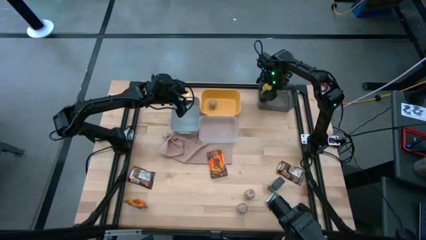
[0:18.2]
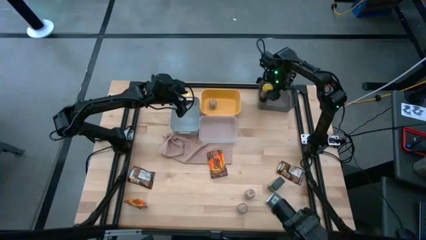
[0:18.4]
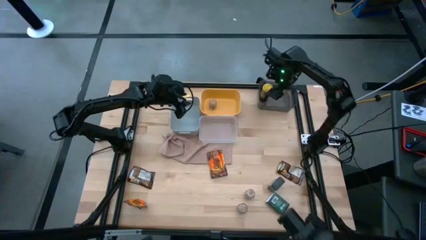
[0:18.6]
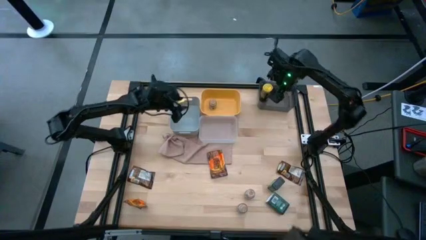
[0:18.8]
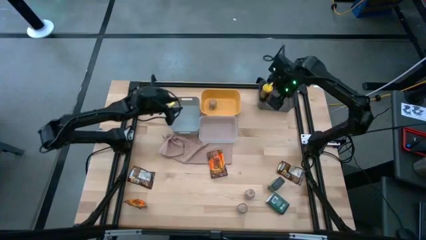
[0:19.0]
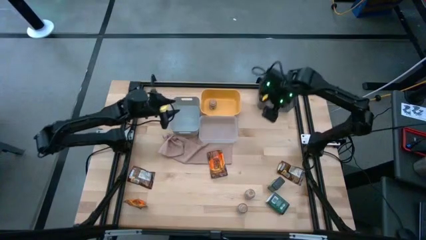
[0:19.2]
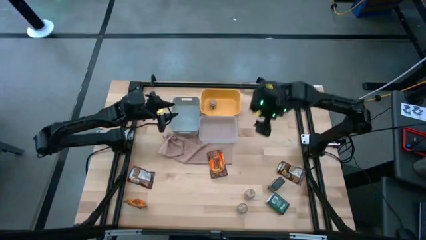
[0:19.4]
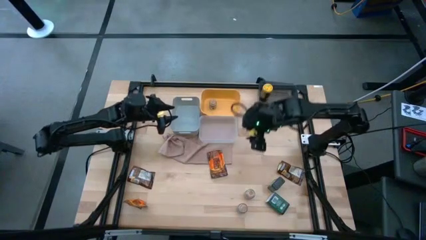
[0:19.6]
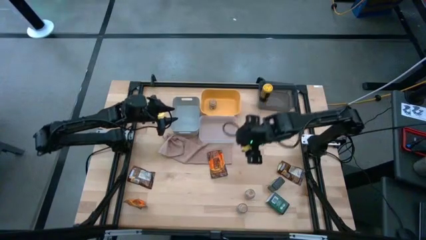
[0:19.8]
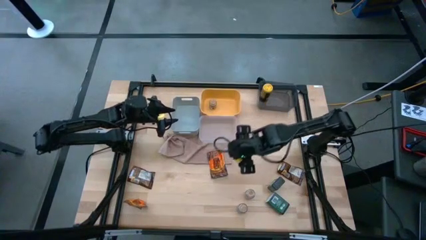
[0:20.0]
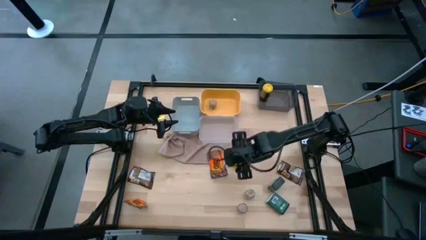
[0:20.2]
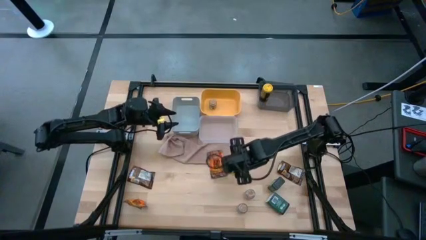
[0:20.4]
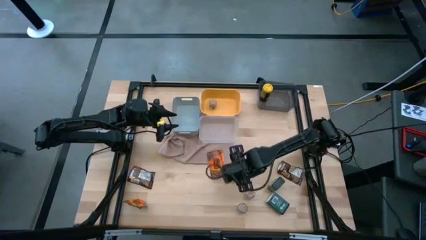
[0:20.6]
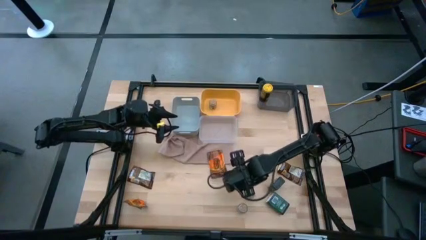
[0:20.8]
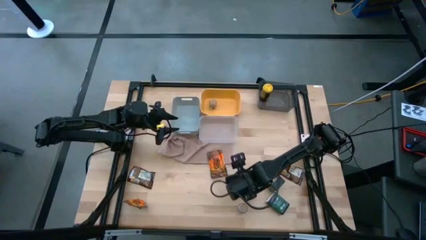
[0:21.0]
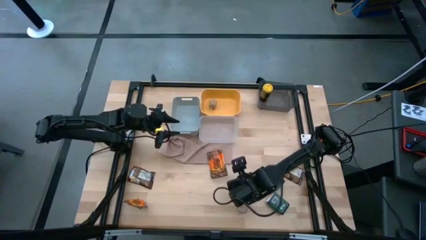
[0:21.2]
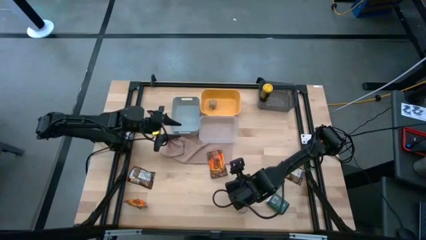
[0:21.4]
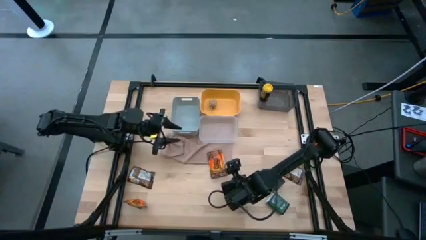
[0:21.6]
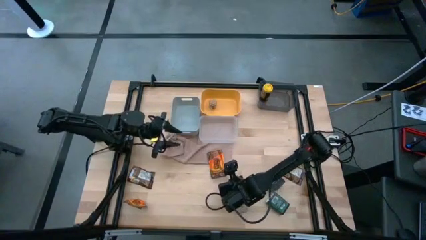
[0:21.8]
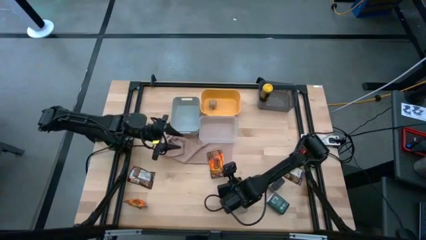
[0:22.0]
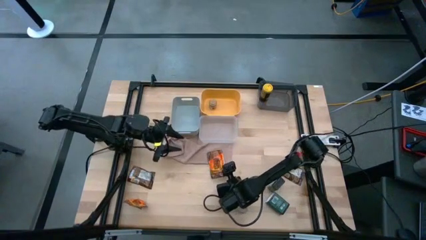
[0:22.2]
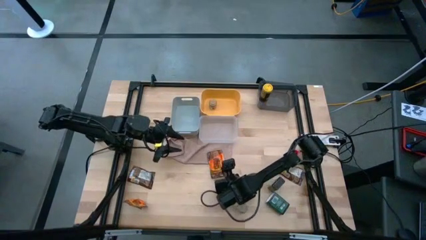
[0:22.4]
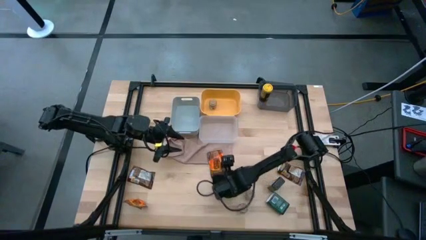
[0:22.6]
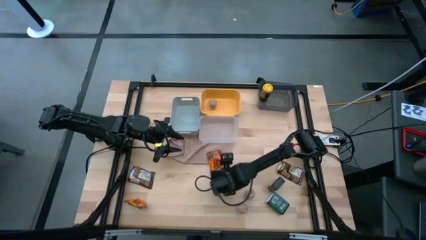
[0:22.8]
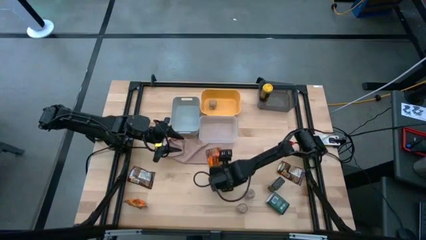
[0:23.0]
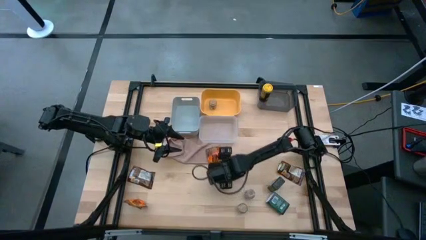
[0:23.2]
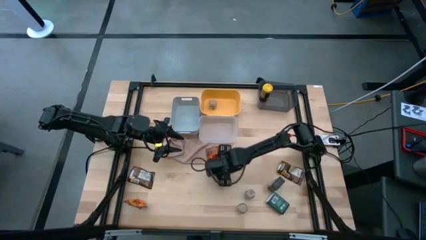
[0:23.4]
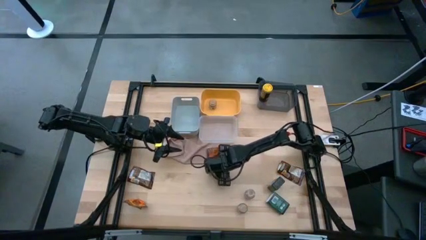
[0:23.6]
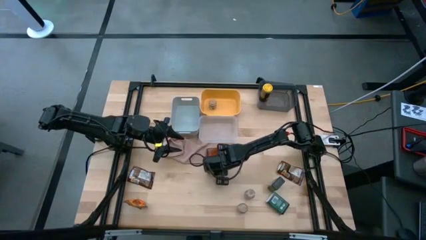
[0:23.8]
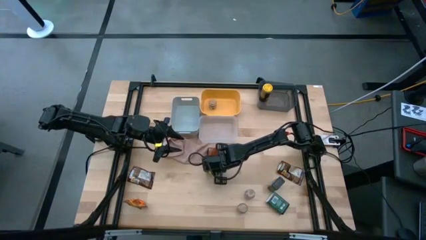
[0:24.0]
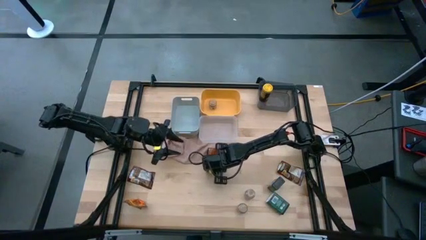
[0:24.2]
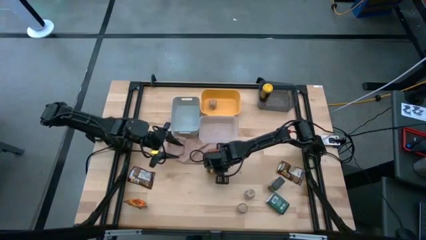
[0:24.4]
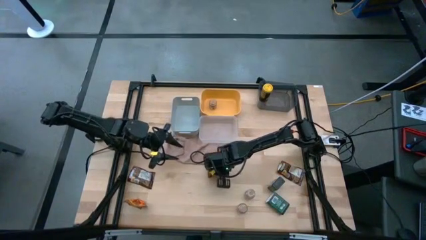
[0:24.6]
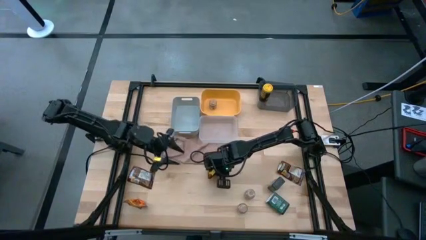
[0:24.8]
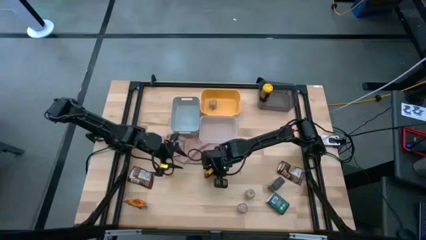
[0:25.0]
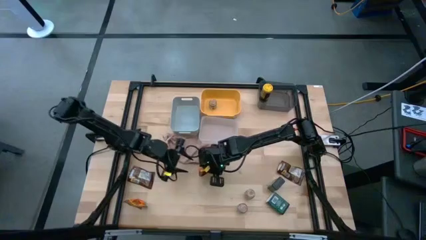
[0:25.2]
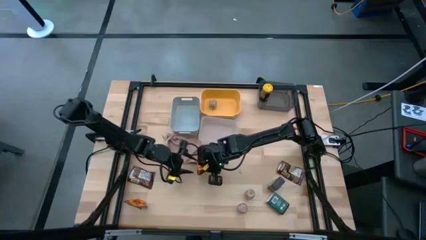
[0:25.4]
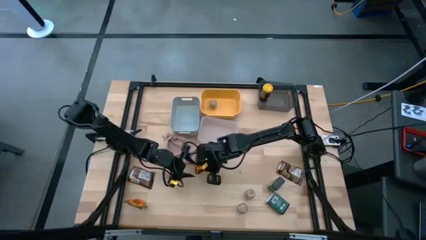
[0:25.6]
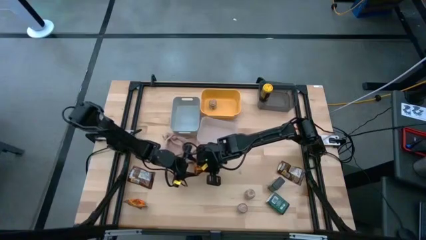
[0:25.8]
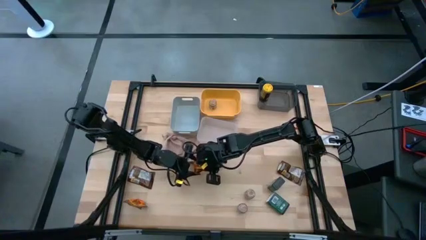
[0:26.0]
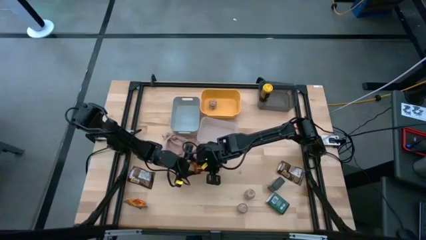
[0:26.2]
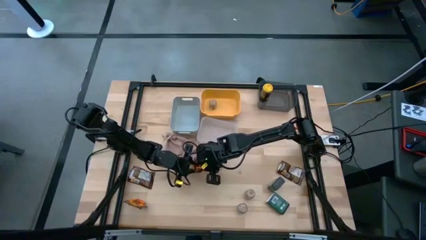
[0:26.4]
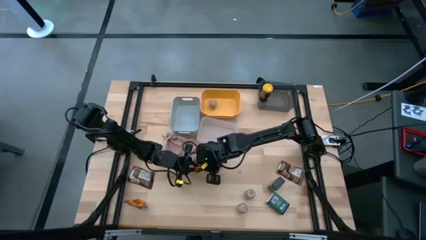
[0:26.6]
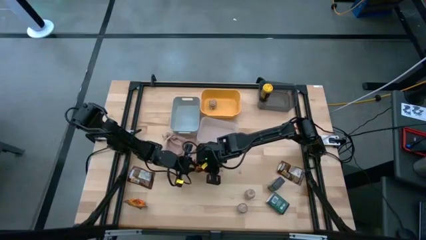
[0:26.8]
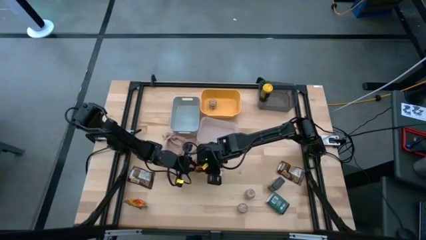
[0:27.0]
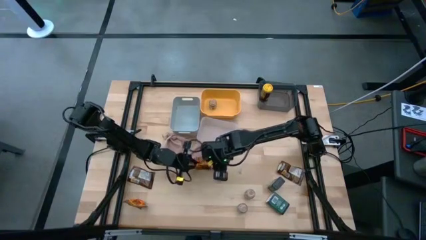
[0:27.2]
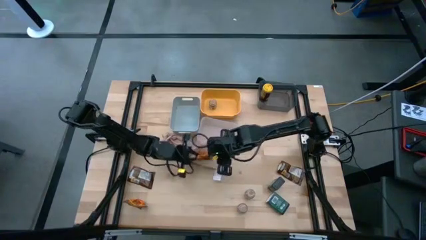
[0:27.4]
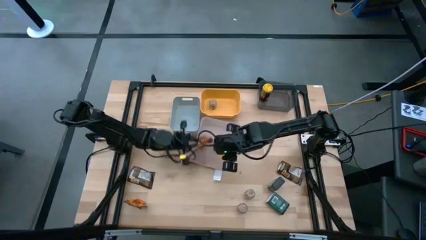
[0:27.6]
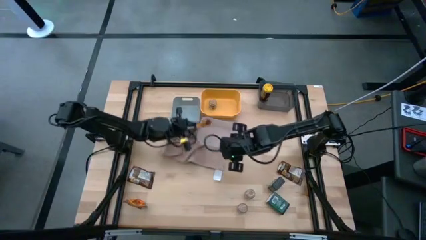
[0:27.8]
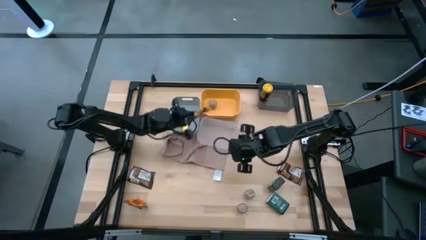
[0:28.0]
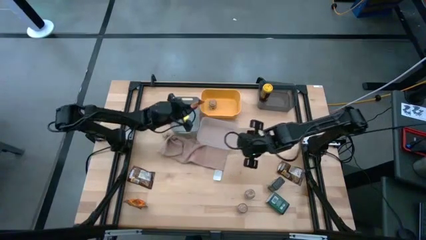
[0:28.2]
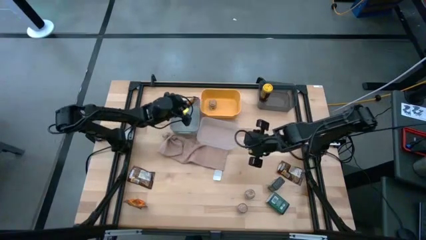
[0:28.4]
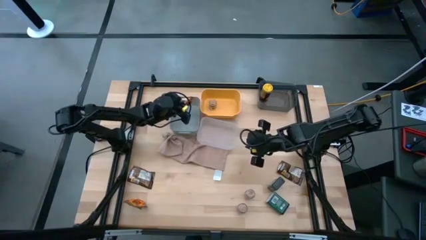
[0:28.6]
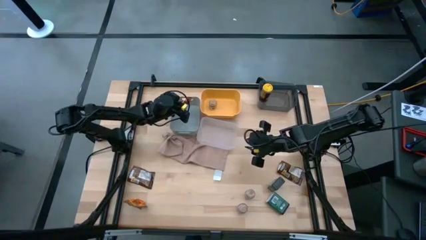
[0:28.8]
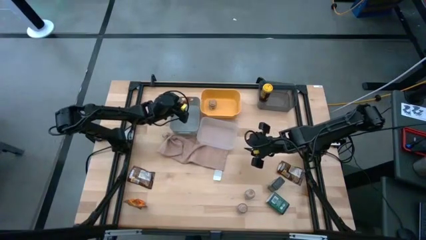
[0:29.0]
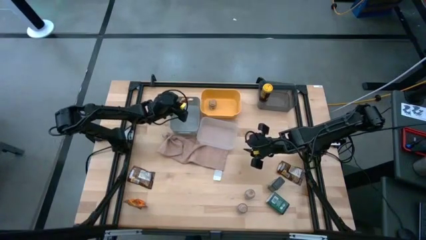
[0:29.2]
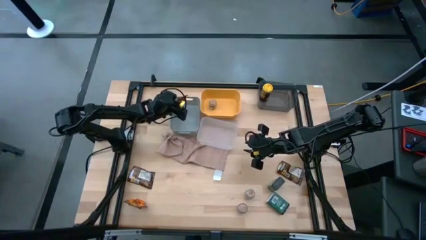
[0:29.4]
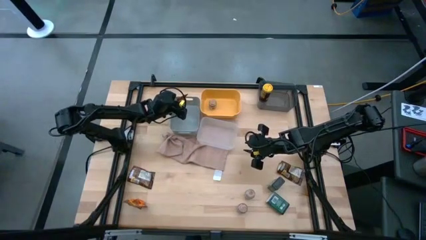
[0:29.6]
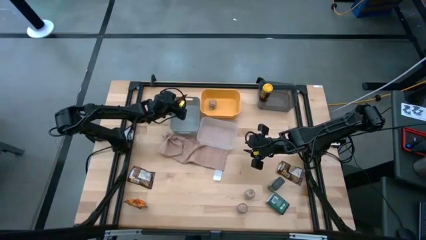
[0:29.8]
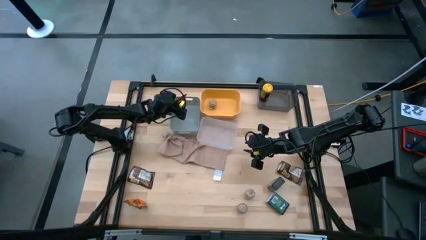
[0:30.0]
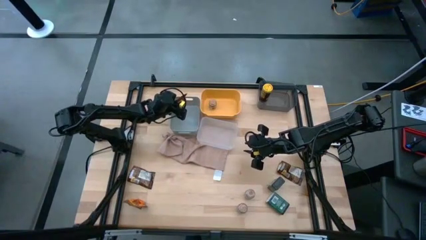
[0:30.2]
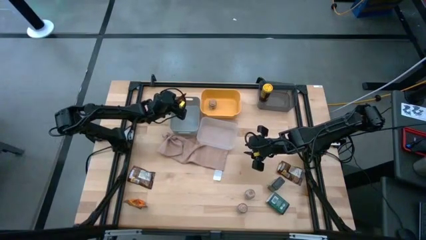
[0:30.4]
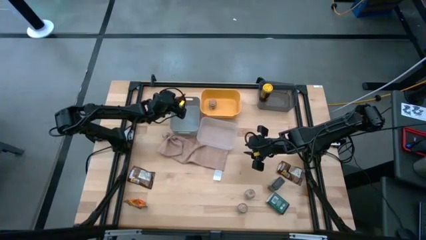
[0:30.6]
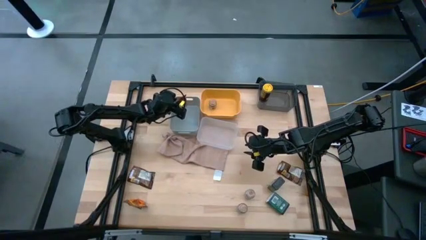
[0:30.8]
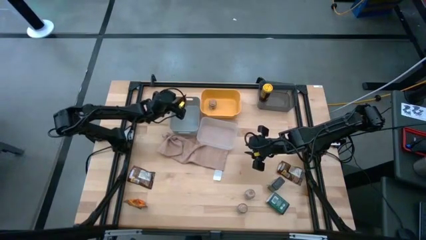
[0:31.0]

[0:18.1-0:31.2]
Task: Sort spices by type
Put the top middle orange seasoning pack into the gray bin

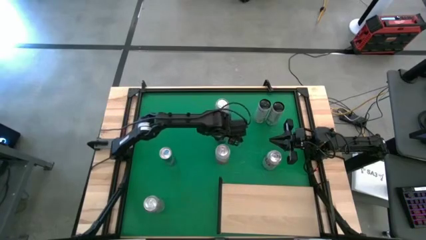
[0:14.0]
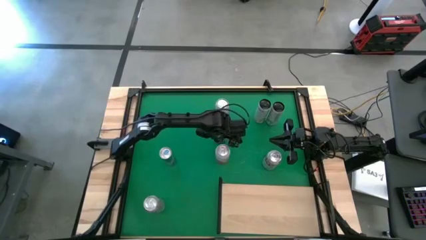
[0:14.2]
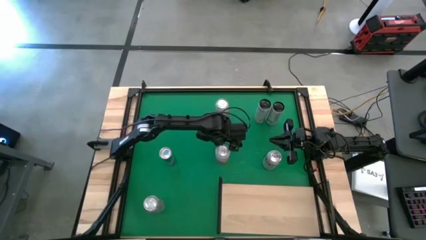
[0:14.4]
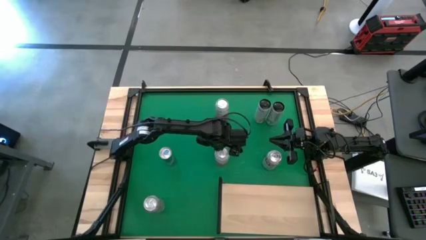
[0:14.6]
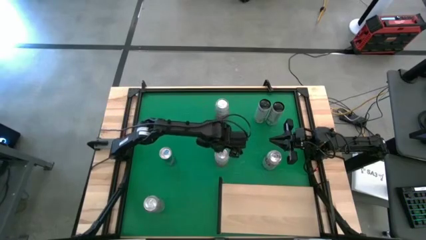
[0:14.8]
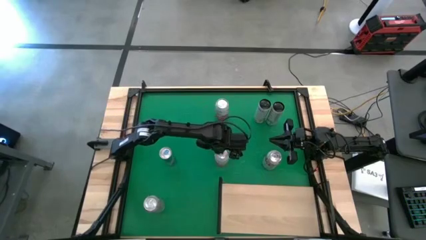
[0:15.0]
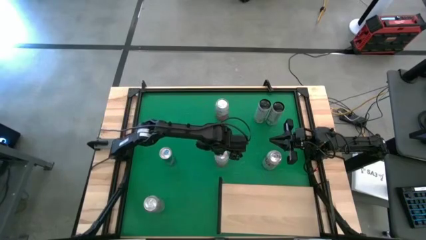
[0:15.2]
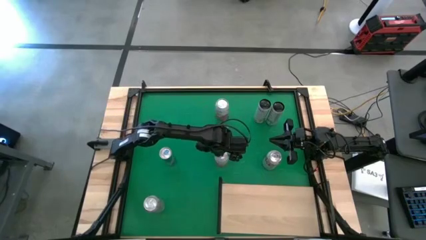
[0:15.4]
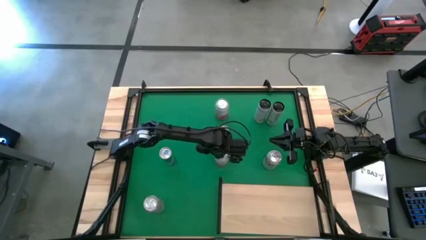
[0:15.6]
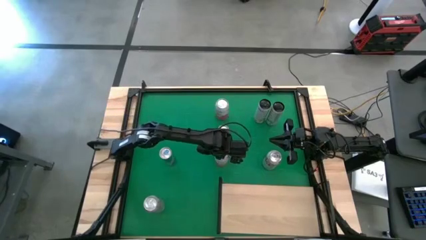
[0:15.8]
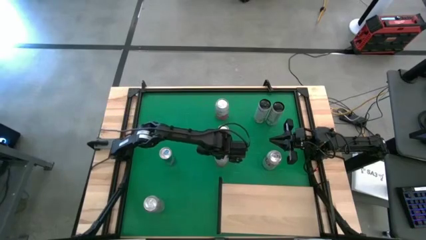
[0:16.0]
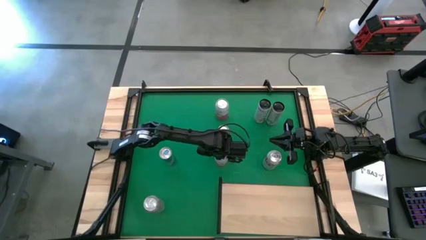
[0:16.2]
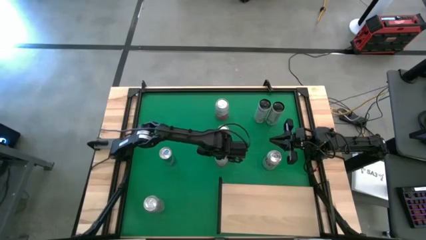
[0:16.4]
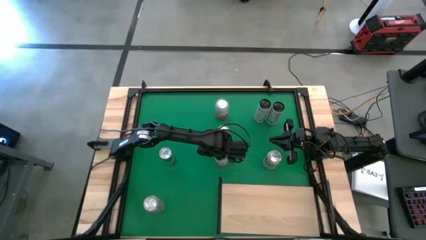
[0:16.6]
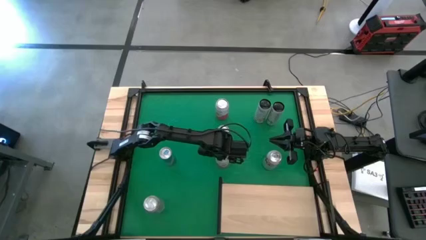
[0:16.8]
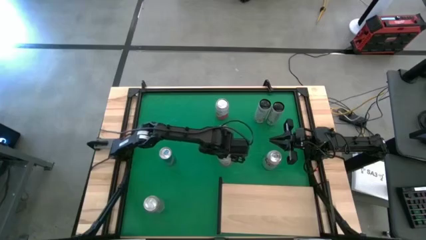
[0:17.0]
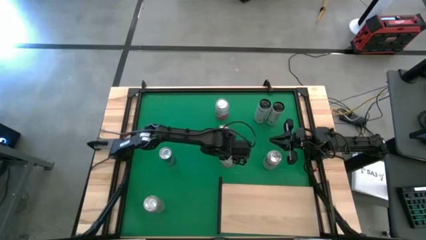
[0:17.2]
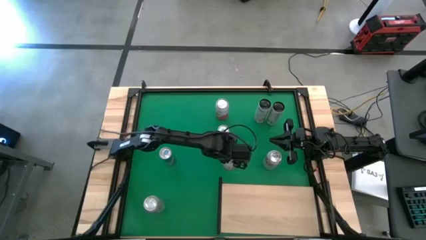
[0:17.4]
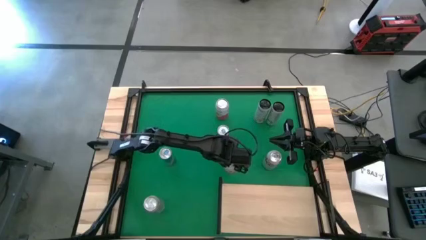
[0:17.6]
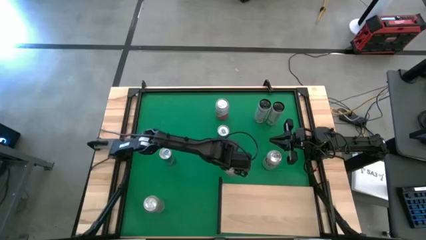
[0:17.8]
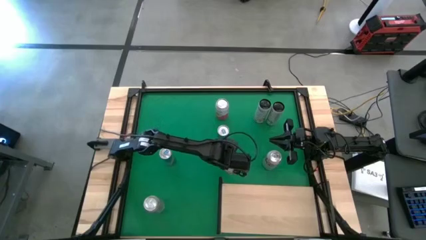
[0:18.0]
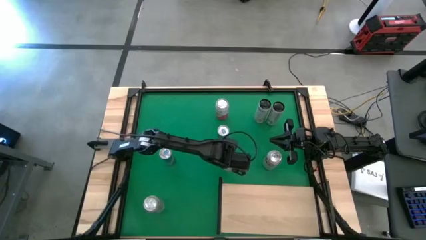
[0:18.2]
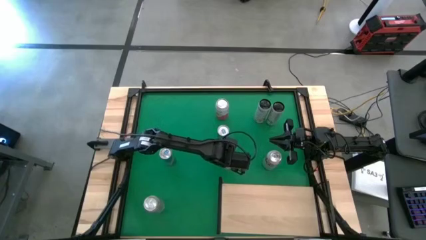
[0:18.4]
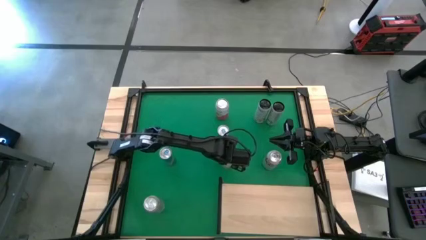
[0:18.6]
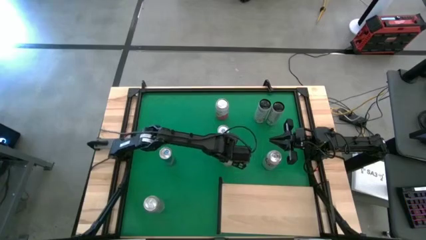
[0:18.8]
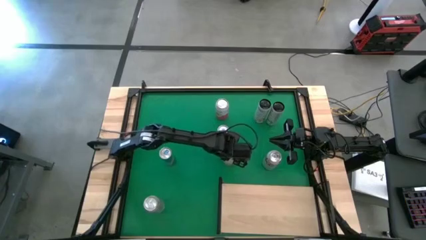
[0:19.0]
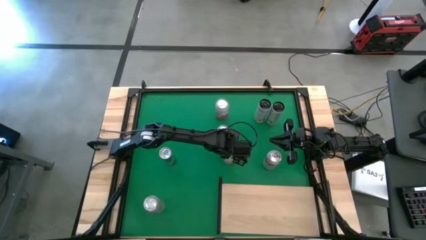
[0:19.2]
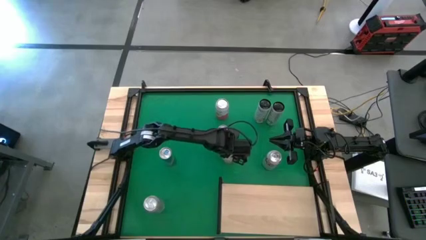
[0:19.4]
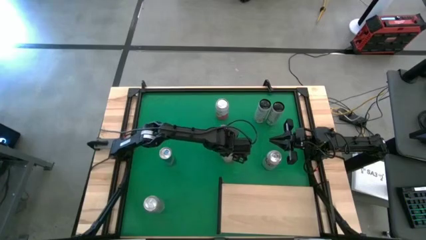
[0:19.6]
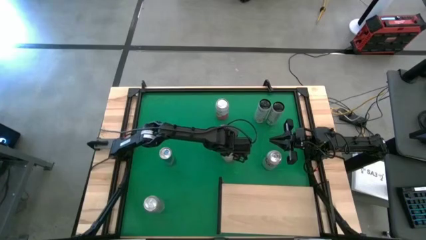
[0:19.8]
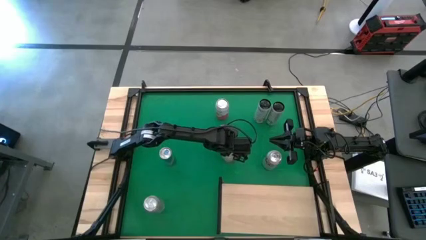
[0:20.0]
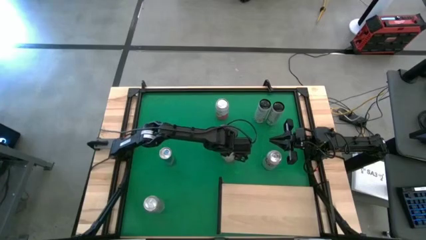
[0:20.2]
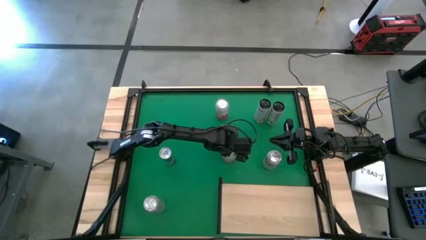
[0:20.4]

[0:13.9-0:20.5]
Task: Place canned beverage on shelf
Adjust the bottom pink-white soda can on the table
